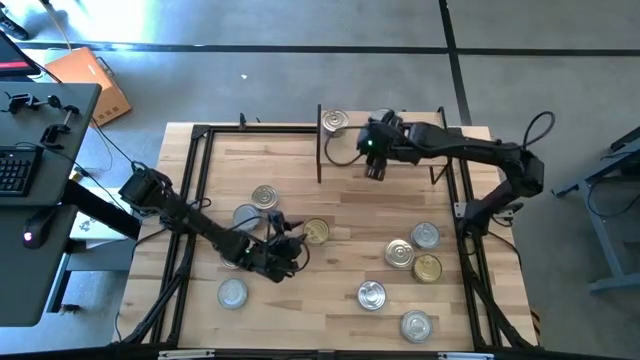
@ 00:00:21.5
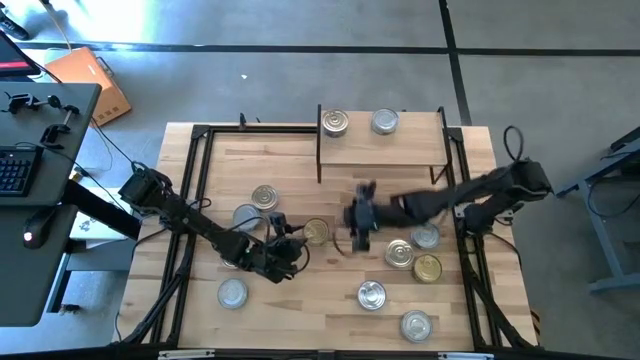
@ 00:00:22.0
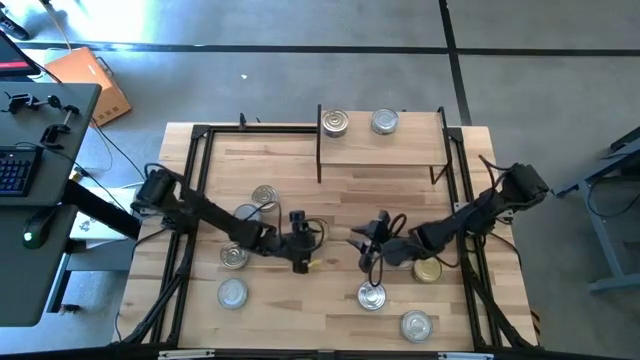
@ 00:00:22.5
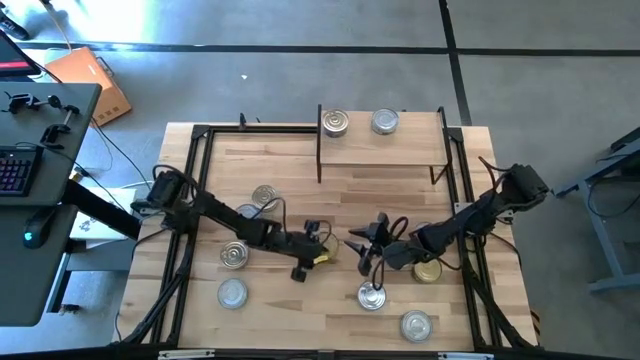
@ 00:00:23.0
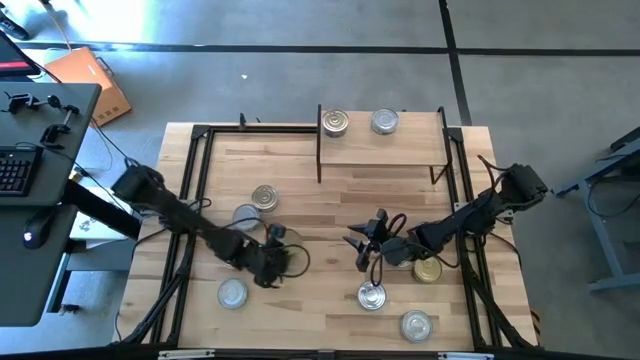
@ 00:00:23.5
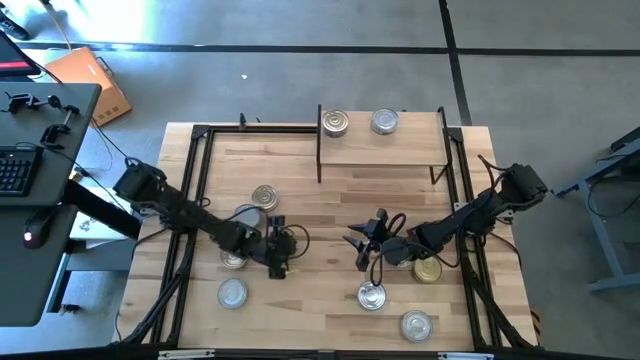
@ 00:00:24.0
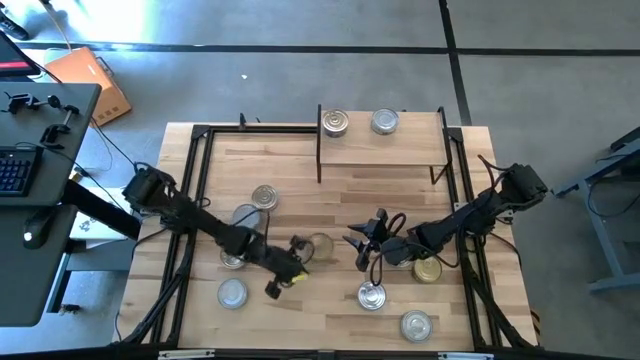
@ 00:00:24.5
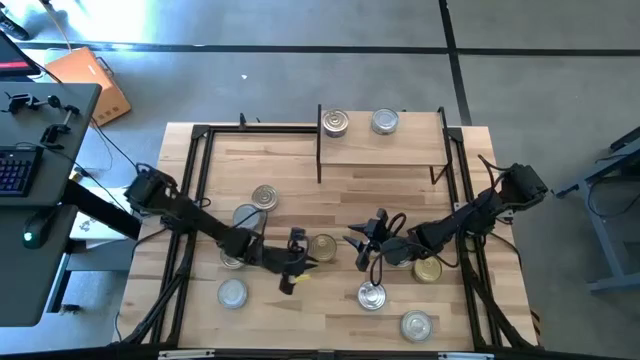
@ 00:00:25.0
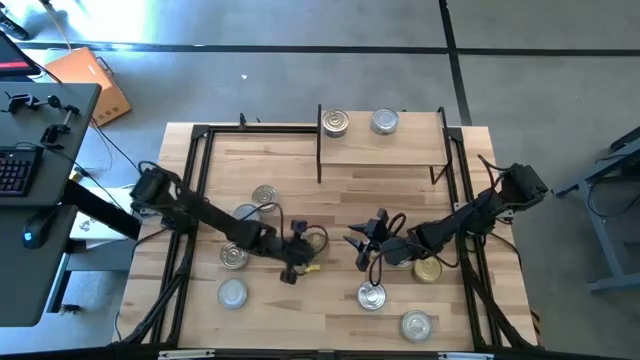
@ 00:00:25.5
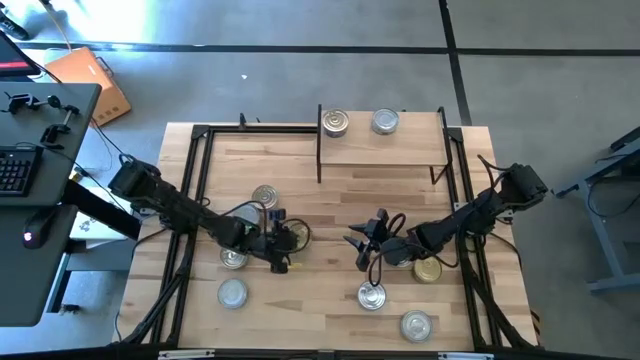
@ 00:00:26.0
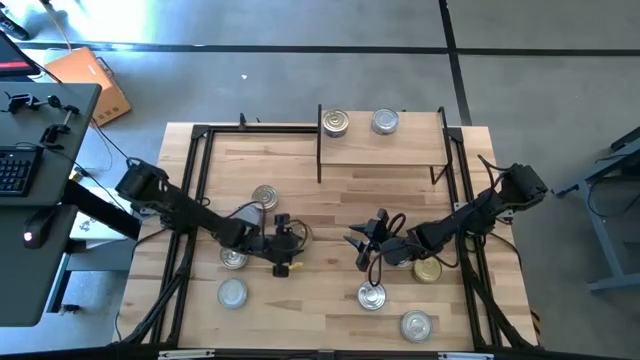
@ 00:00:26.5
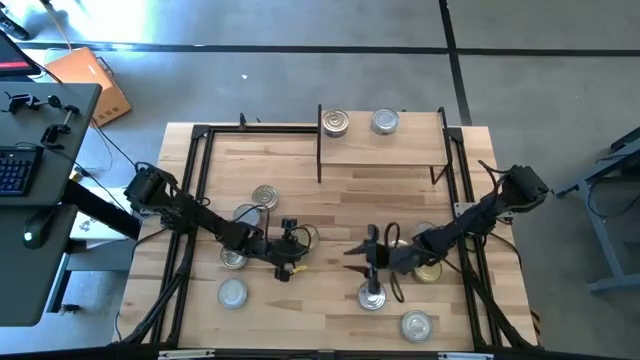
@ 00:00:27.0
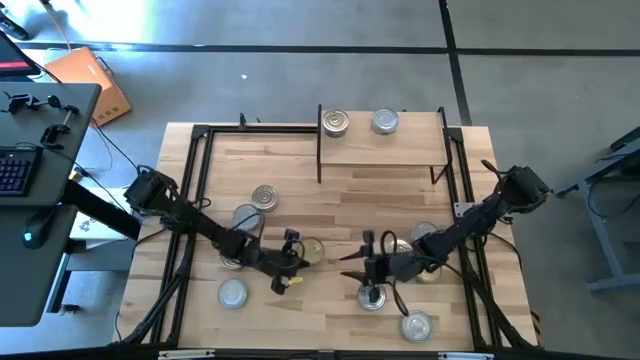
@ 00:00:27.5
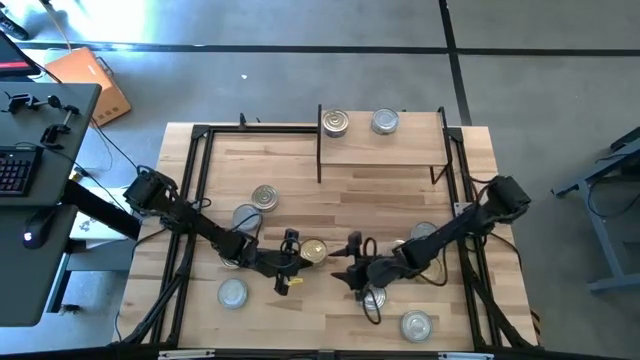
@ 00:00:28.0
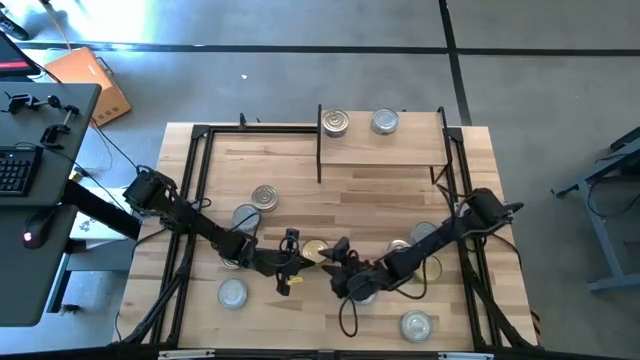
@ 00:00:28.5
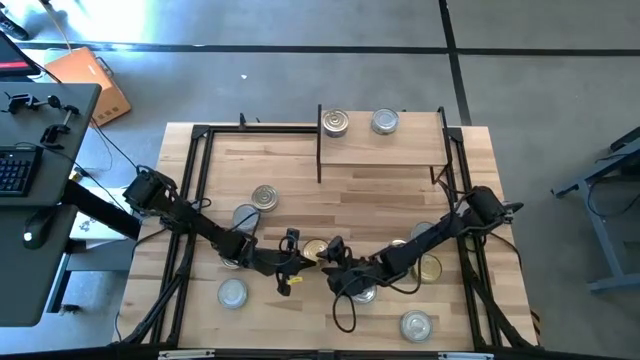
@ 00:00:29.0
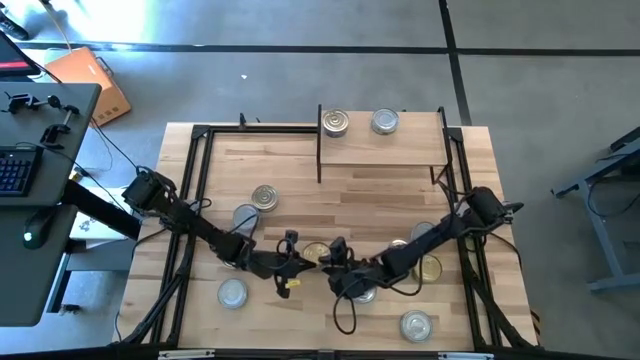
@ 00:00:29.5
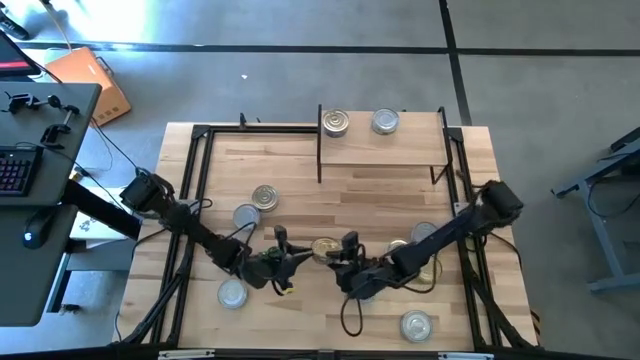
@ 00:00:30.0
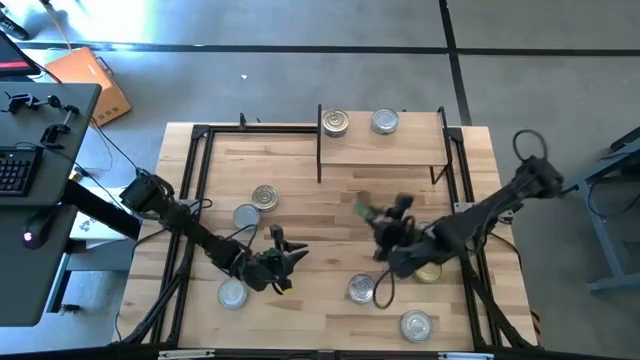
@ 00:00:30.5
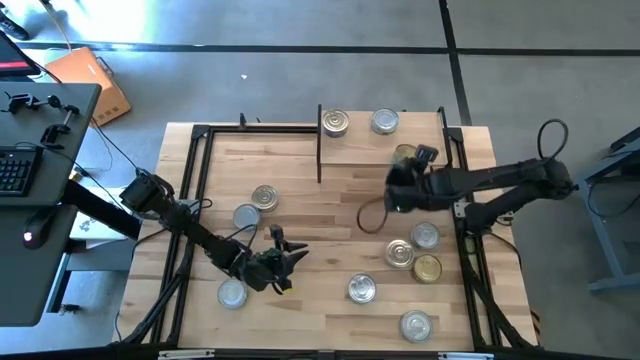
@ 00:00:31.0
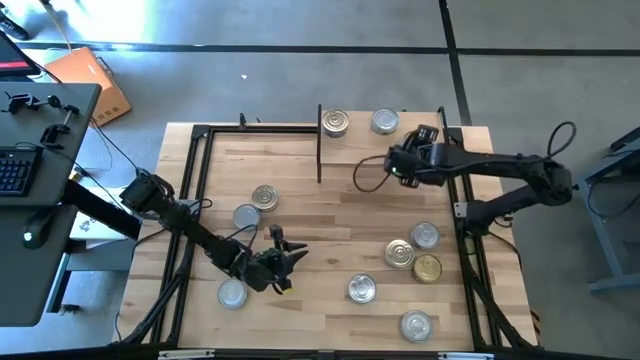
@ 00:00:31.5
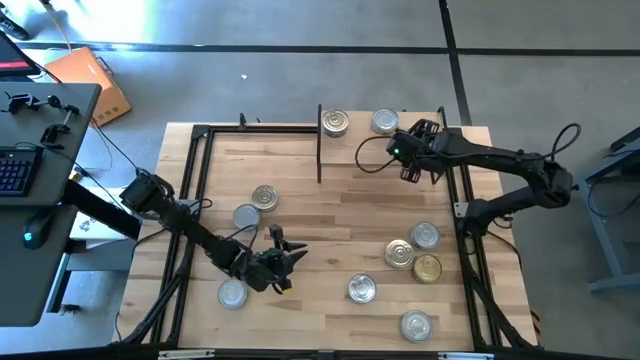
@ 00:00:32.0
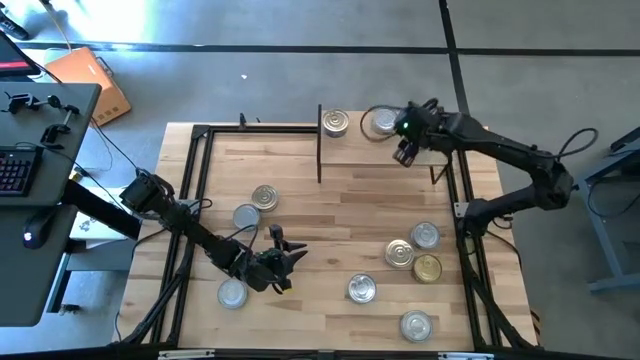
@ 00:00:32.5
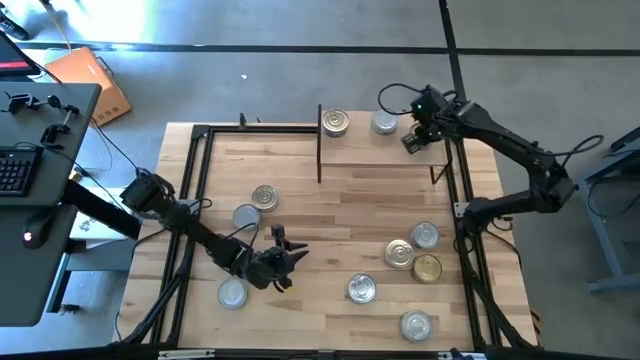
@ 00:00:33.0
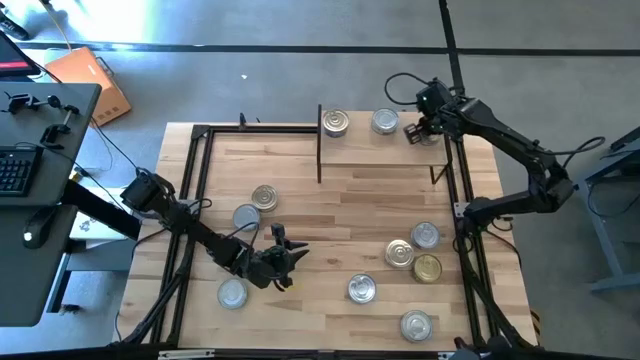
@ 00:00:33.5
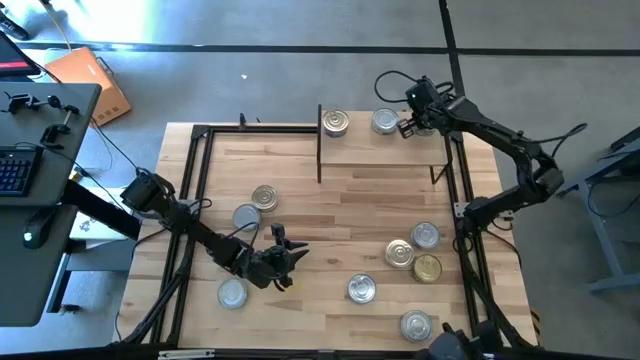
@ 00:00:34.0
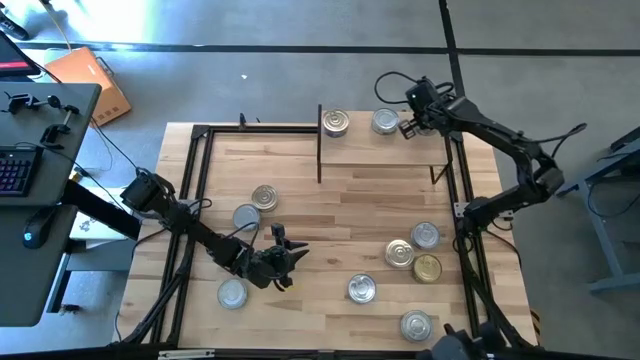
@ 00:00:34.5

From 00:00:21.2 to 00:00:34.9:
Task: Stack canned seafood by type on shelf
Put the green tuna can on the shelf

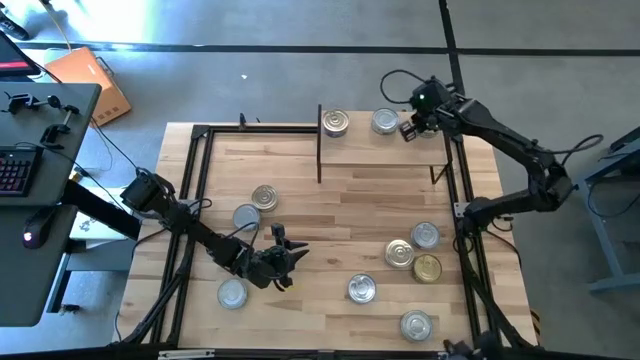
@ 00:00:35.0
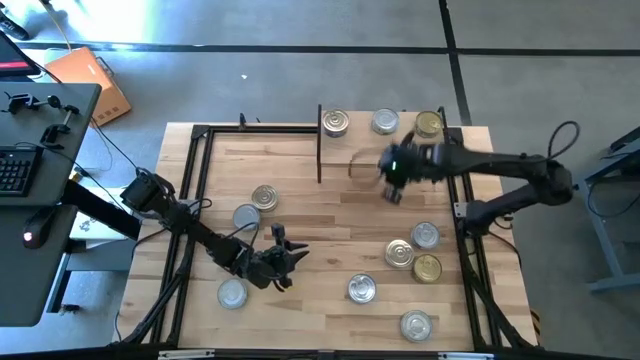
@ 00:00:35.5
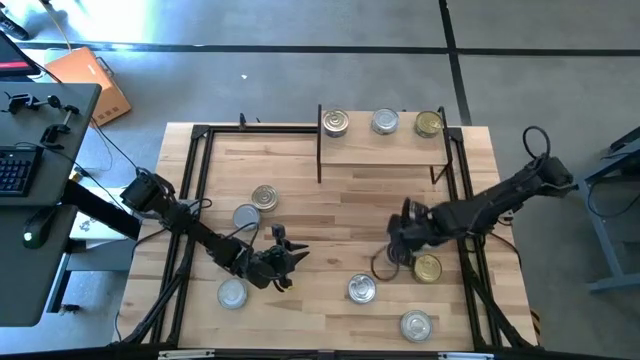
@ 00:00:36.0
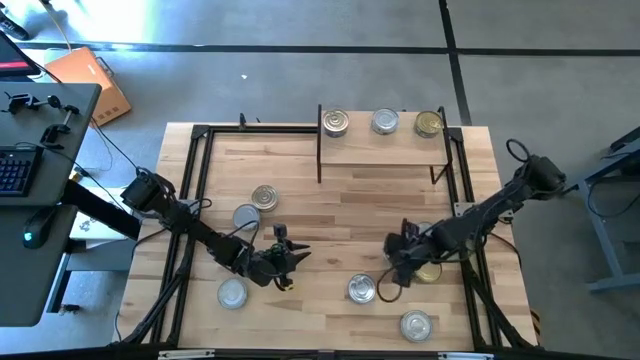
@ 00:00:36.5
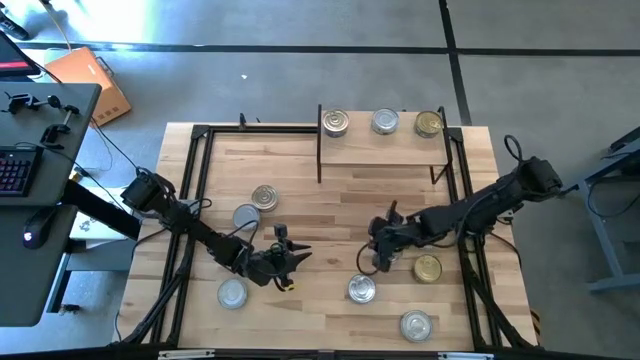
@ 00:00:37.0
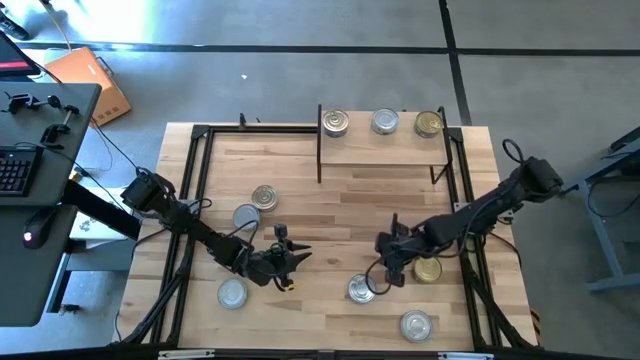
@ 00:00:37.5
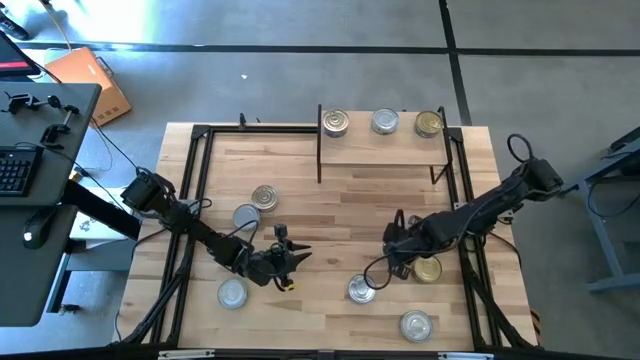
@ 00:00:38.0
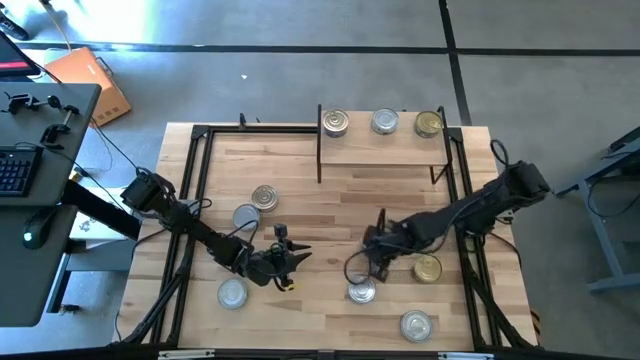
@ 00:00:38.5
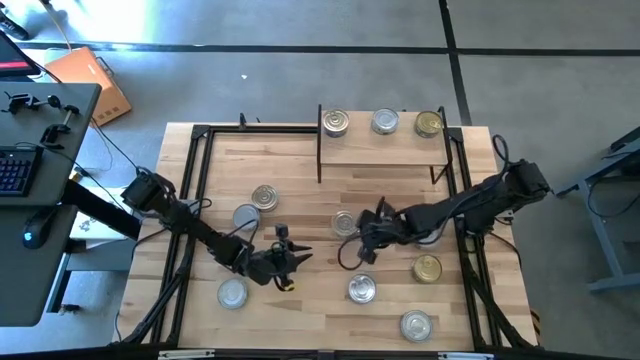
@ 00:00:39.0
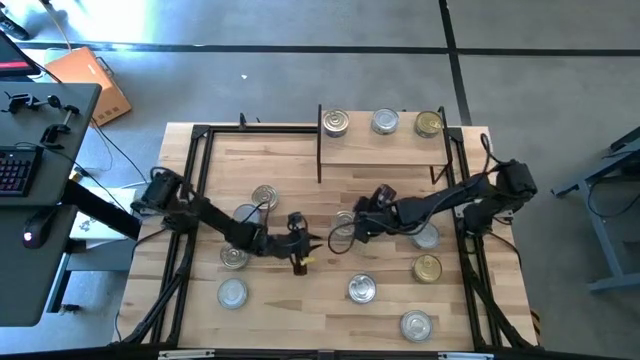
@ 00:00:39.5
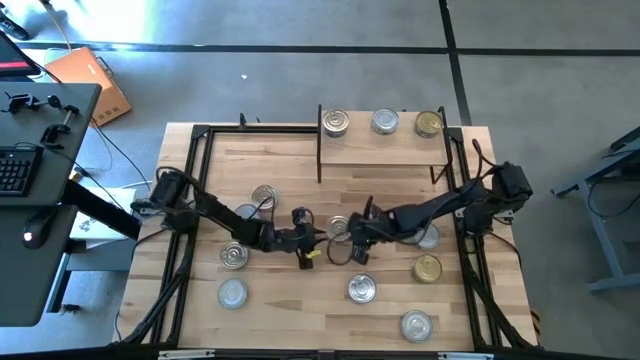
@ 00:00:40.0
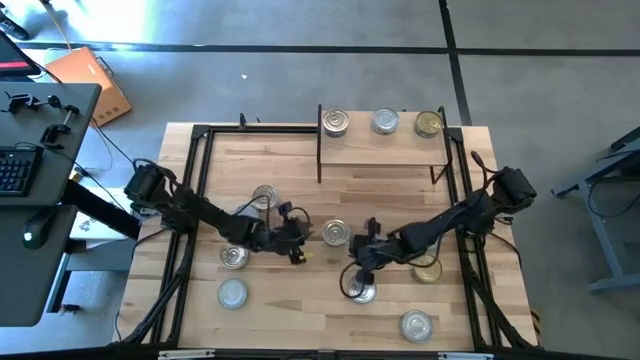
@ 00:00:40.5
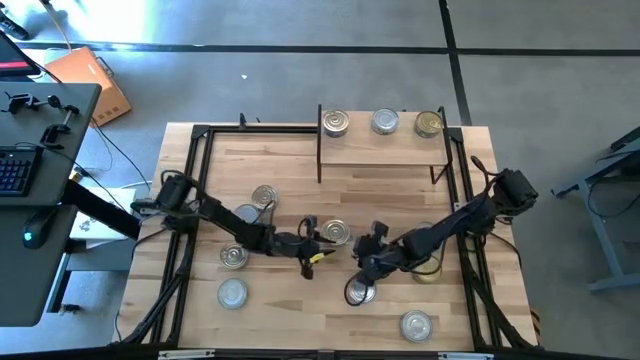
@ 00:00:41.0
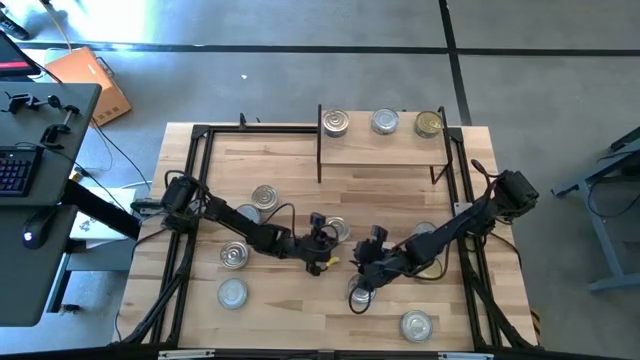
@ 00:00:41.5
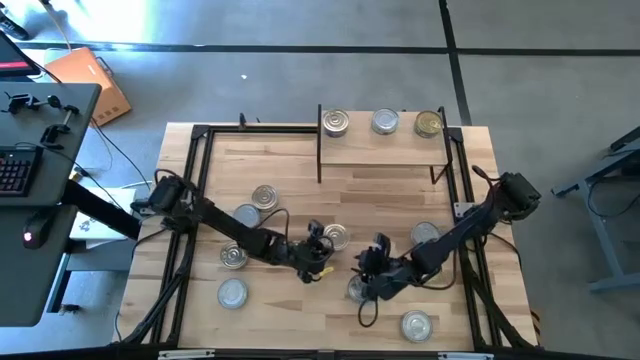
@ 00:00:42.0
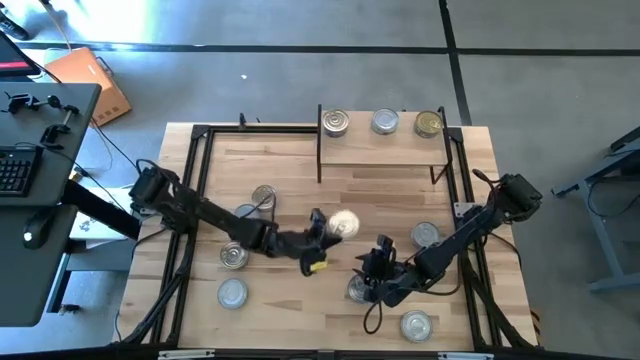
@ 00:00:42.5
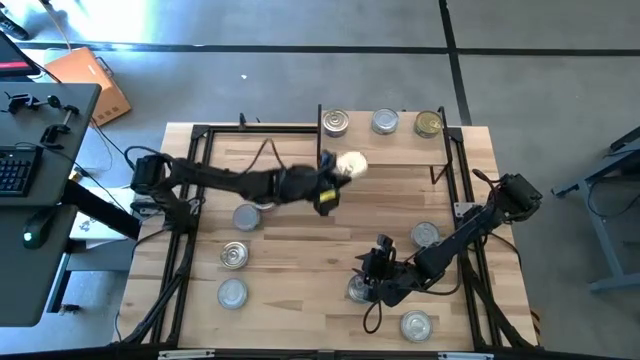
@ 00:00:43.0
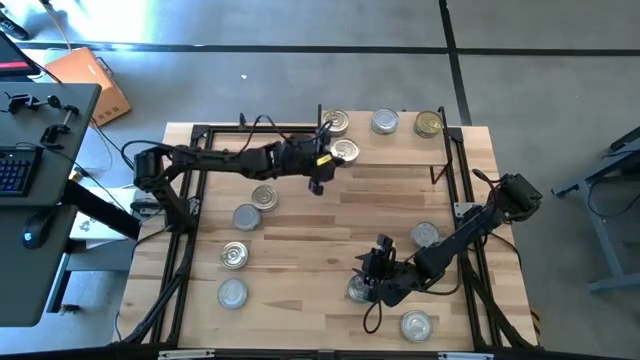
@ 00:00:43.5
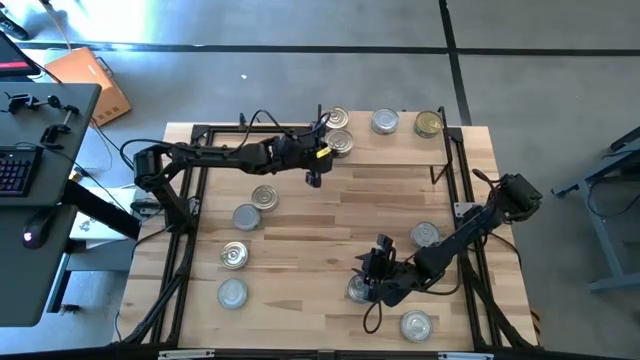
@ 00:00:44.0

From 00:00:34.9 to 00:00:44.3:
Put the blue tuna can on the shelf
